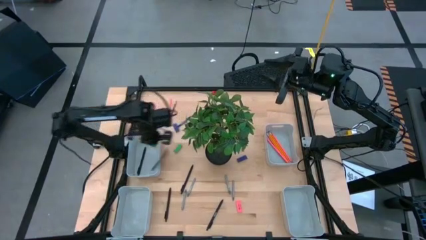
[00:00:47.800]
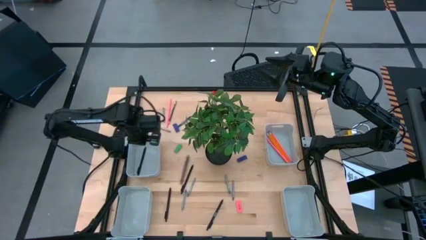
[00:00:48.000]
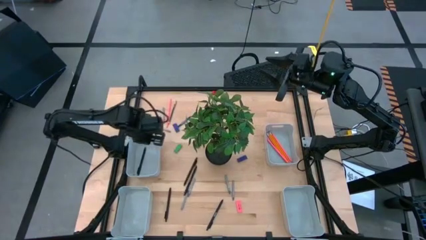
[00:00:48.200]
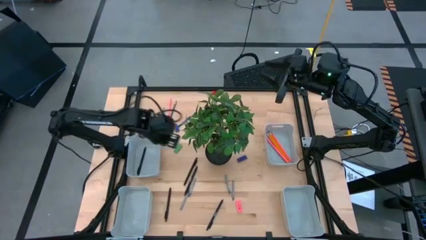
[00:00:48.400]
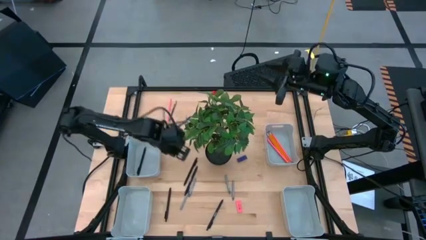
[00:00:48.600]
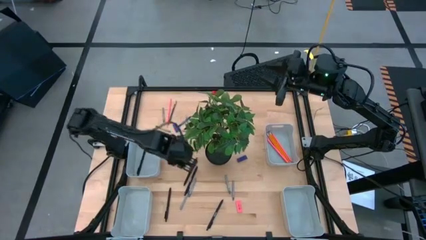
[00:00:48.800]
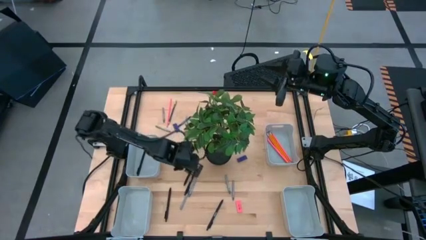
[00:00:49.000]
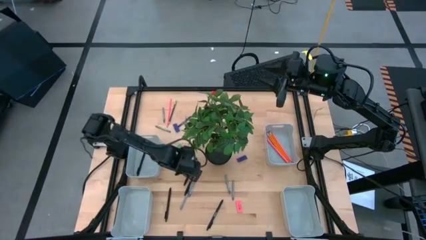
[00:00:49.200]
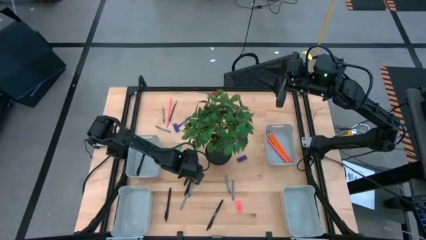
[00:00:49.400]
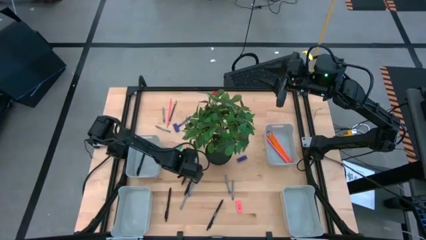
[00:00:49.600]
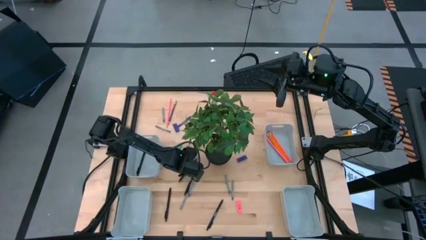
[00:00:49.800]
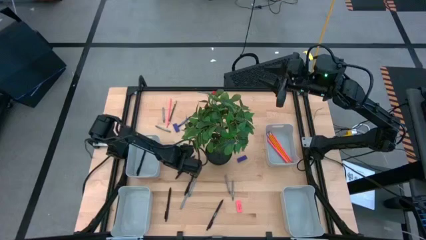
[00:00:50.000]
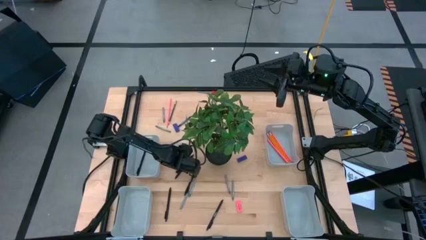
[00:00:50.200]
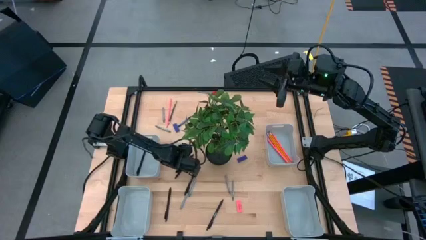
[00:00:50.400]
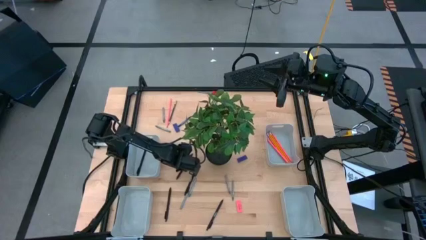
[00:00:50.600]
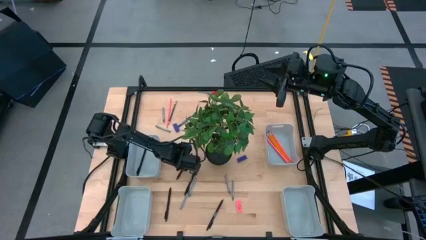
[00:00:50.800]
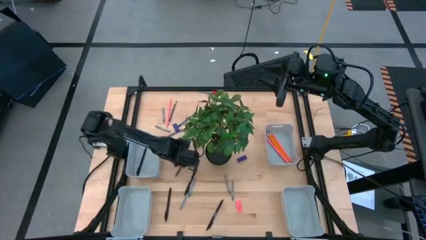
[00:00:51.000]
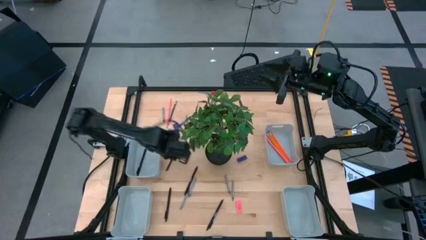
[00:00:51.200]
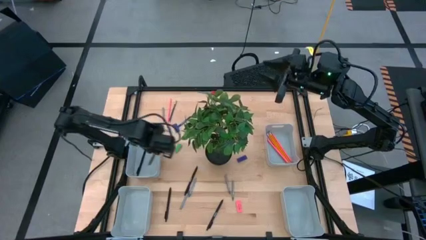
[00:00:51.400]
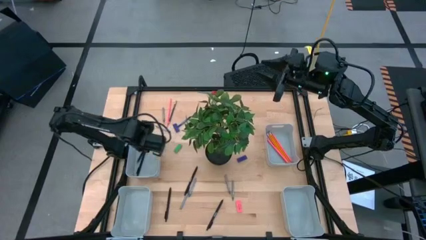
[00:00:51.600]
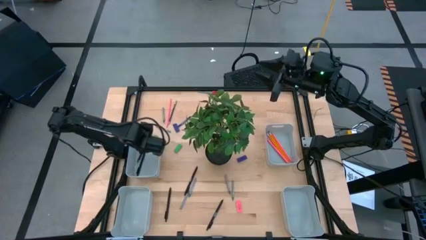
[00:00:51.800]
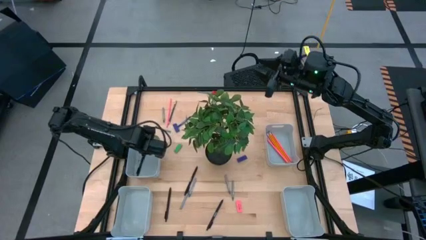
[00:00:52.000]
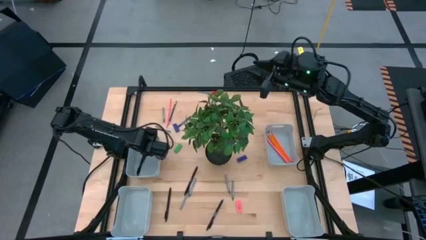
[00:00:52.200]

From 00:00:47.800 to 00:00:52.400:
Task: Sort crayons/erasers/pens/pencils in bins
Put the black pen into the top left gray bin

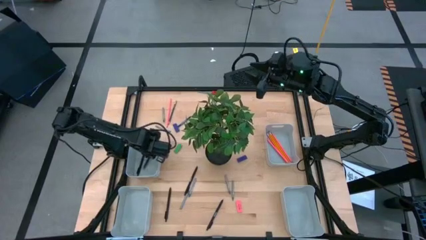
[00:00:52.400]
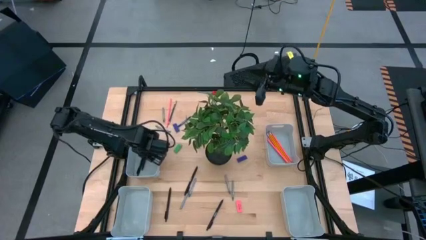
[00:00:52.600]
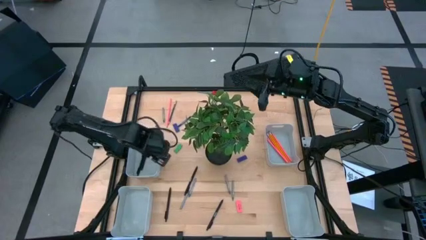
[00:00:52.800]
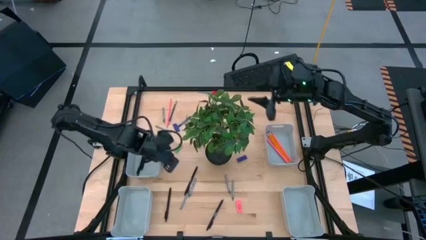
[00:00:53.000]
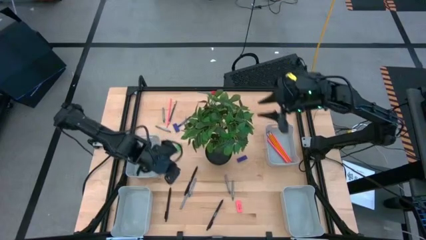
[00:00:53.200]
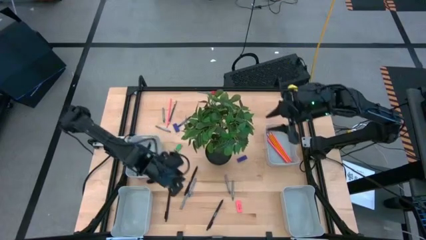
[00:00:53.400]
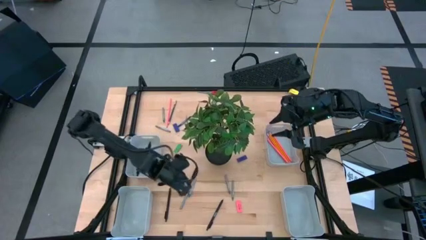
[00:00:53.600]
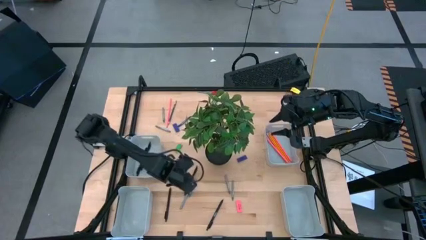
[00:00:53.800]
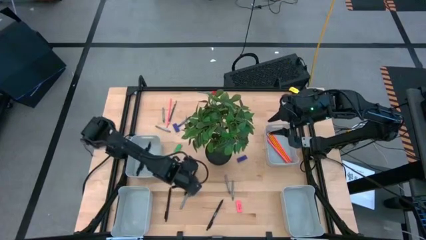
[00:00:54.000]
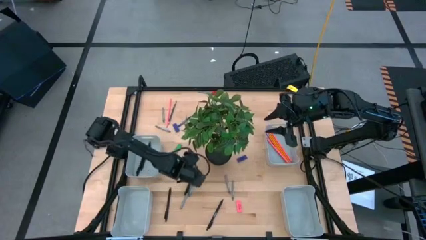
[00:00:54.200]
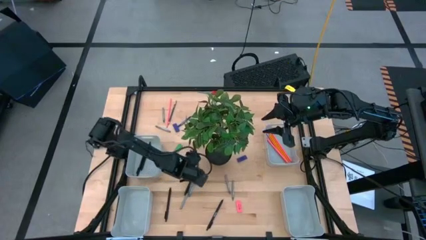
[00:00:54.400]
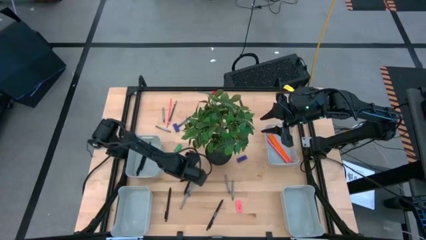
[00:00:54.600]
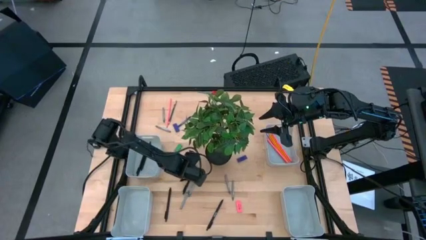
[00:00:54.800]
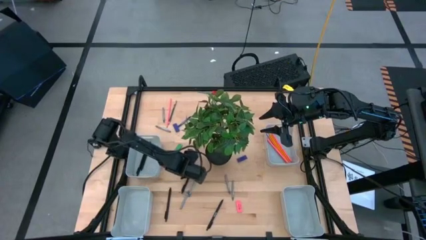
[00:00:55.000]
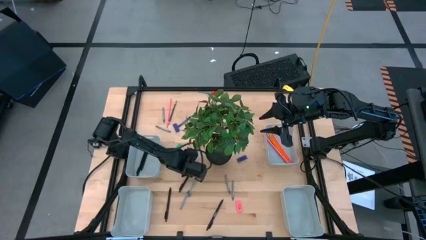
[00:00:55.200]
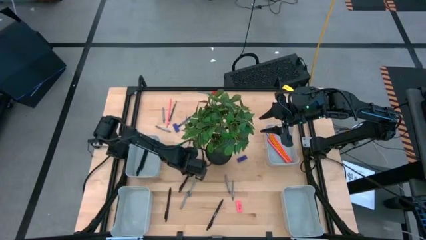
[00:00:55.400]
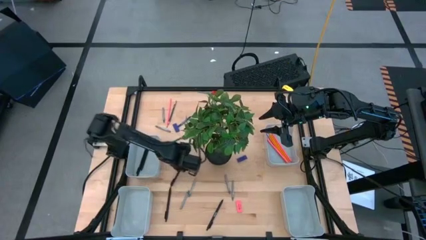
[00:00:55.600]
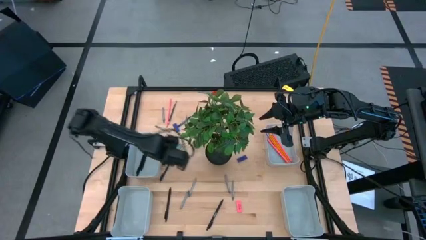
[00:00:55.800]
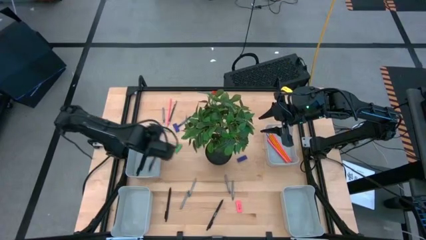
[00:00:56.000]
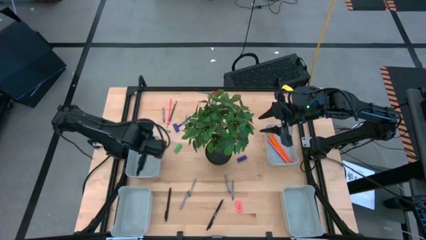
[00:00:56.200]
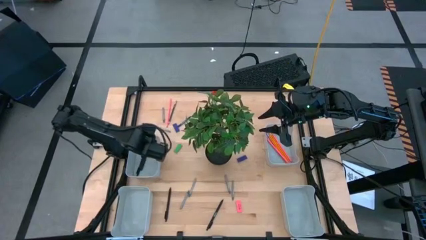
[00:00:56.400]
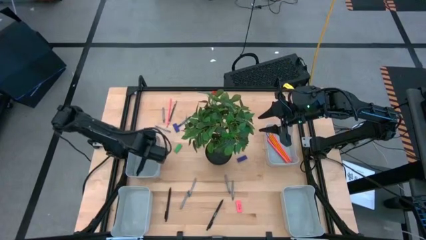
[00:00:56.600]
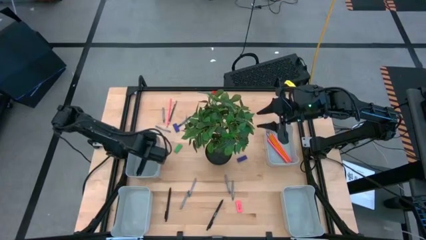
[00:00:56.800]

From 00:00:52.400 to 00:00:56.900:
Put the black pen into the top left gray bin

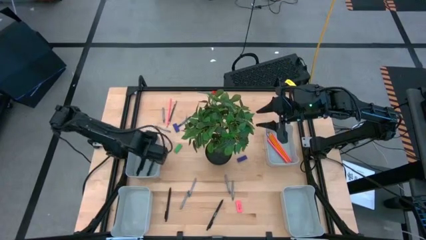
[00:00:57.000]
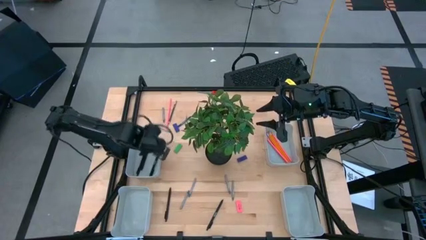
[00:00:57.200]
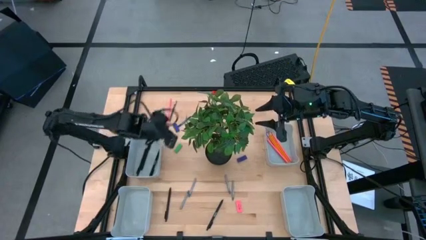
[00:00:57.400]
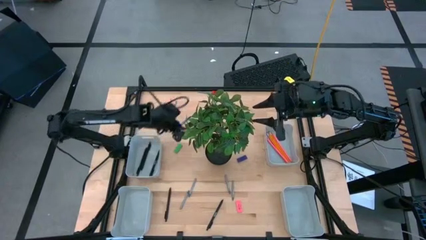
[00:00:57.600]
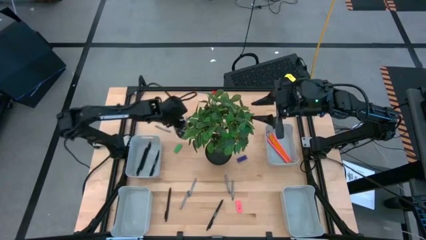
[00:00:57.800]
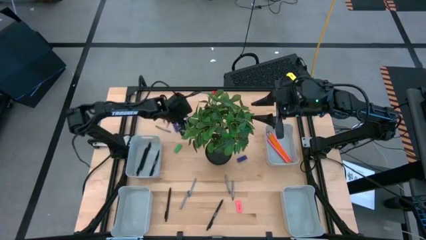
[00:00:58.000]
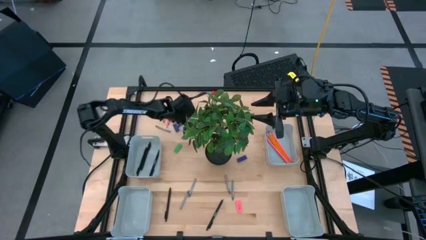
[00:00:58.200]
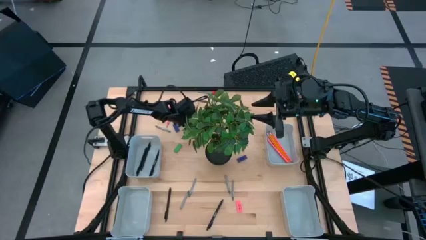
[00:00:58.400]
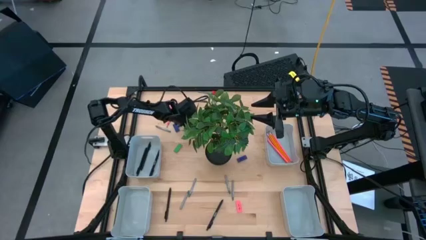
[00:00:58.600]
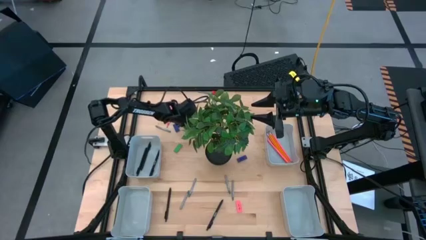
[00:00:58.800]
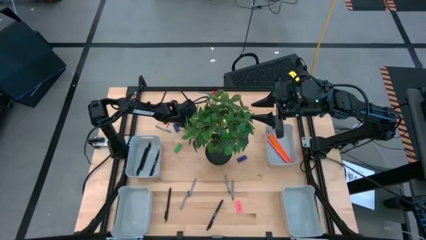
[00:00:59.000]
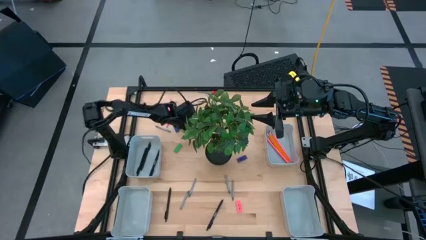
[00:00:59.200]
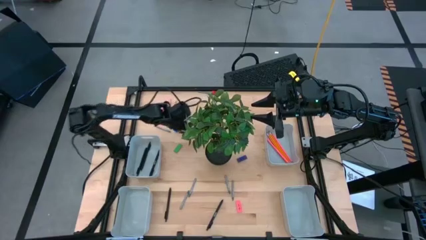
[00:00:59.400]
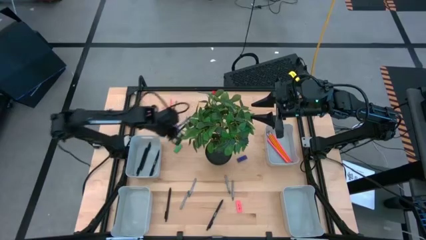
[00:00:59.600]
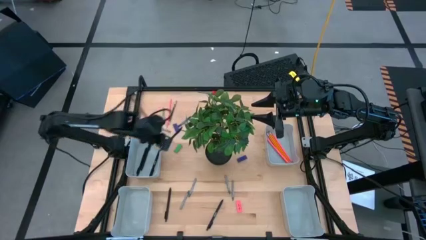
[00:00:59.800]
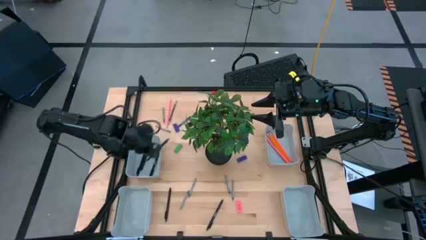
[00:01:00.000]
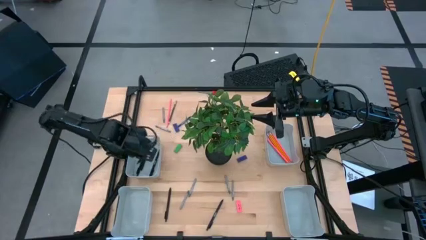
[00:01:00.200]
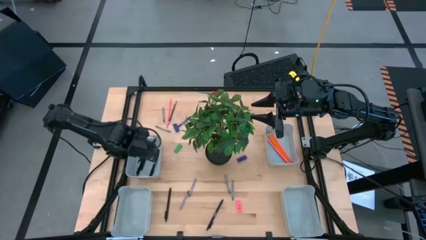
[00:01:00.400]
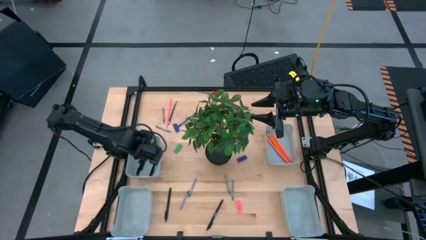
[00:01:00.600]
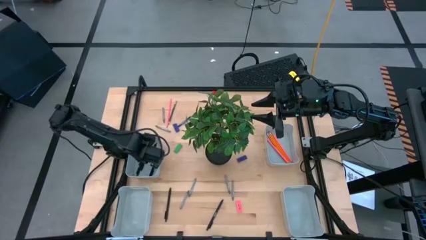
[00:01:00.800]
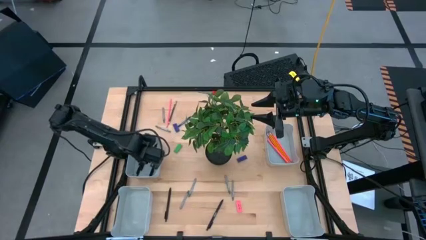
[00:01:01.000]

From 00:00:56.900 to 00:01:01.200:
Put the black pen into the top left gray bin

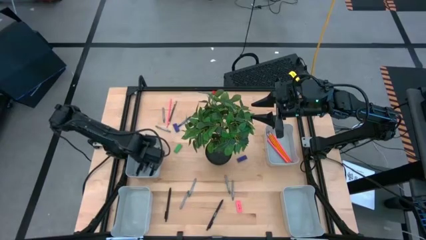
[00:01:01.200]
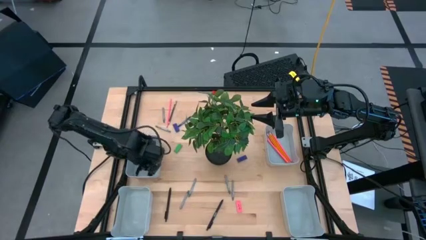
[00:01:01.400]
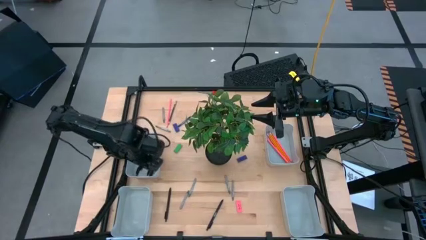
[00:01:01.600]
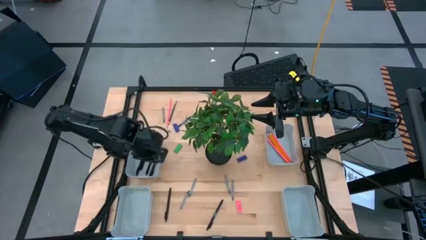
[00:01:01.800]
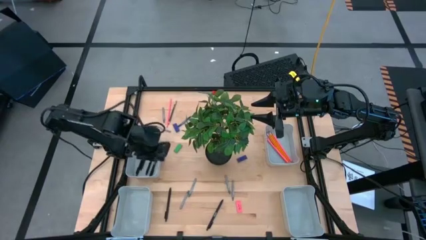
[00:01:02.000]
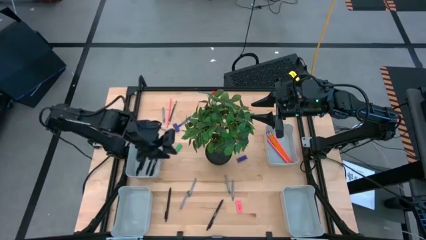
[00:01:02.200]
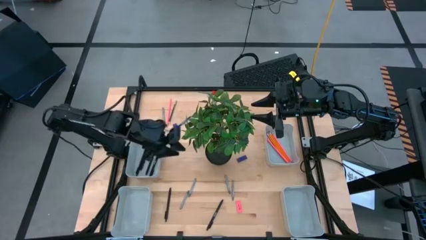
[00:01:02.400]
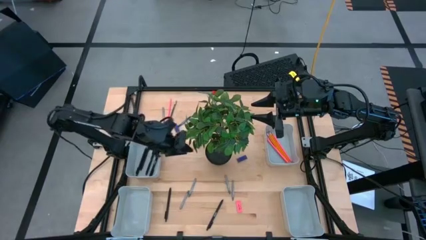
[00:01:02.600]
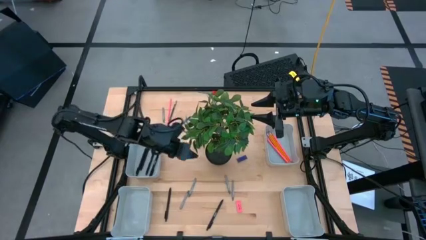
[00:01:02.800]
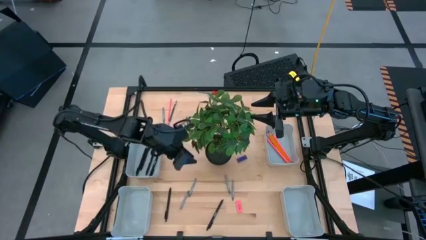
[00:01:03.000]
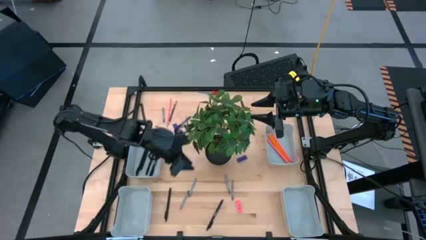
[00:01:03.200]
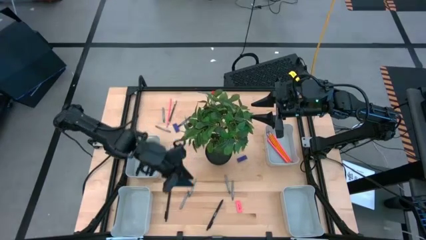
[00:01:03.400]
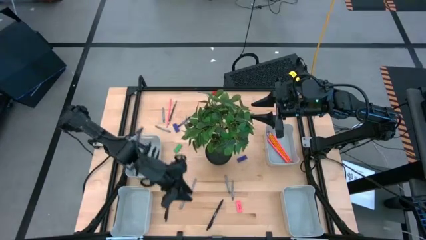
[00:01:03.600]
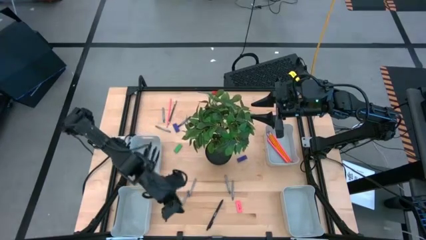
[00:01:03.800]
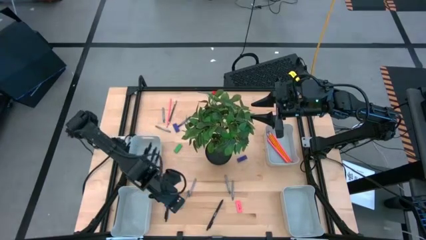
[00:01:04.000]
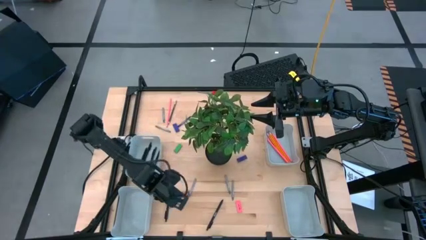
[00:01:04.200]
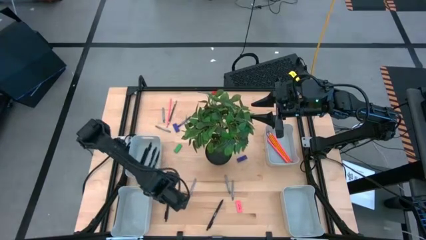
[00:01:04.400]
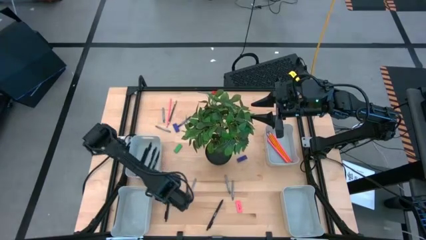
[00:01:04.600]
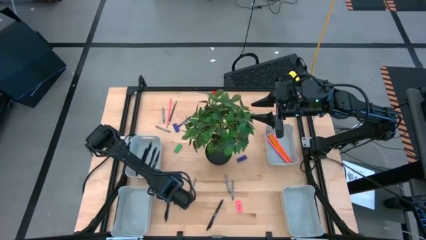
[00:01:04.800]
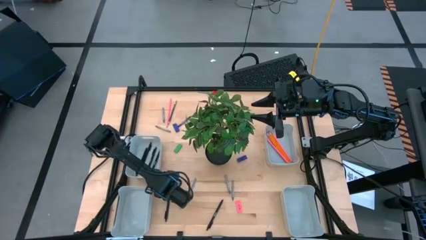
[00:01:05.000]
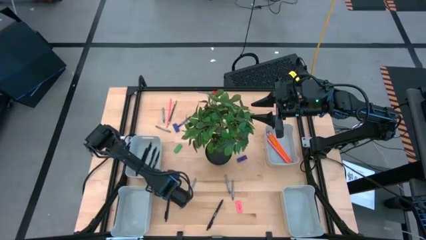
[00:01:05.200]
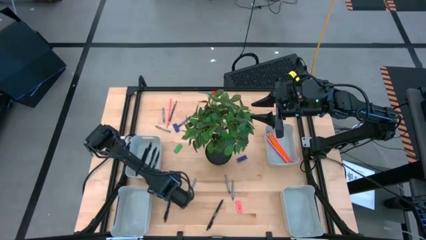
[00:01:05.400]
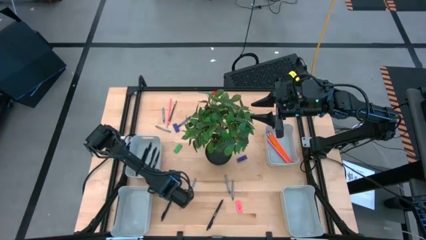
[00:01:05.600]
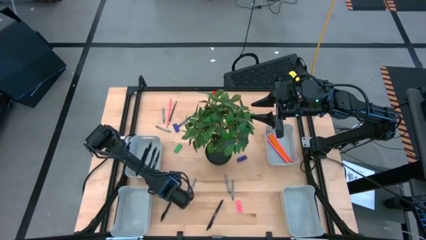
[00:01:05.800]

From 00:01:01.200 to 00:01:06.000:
Put the black pen into the top left gray bin
